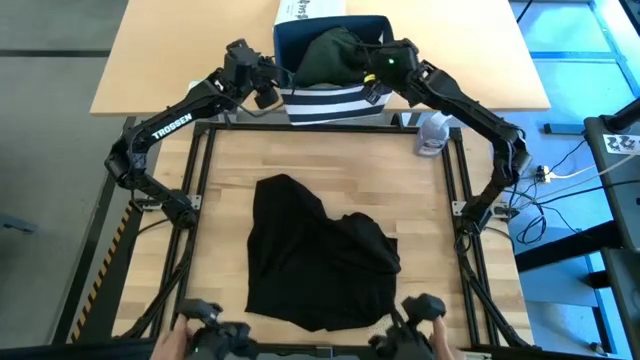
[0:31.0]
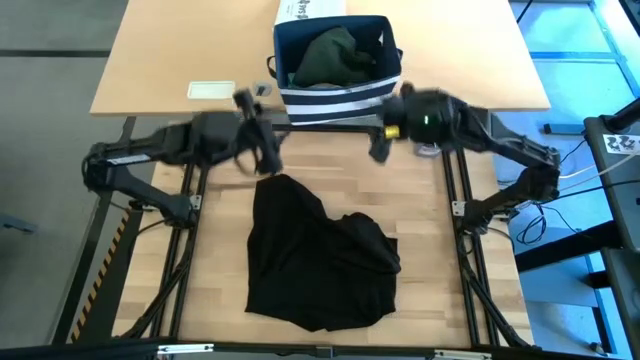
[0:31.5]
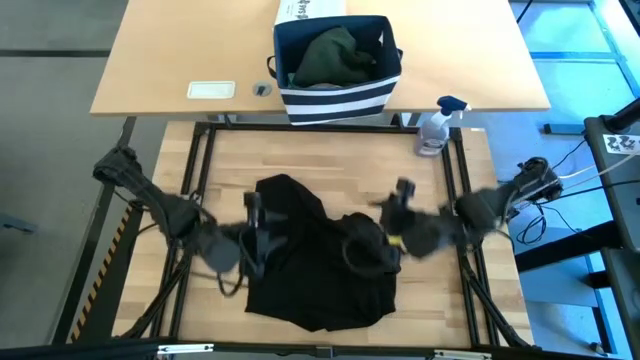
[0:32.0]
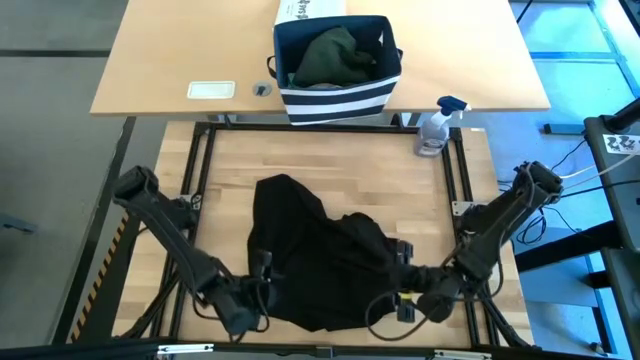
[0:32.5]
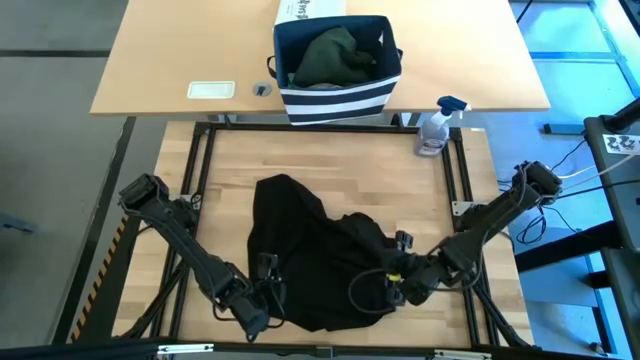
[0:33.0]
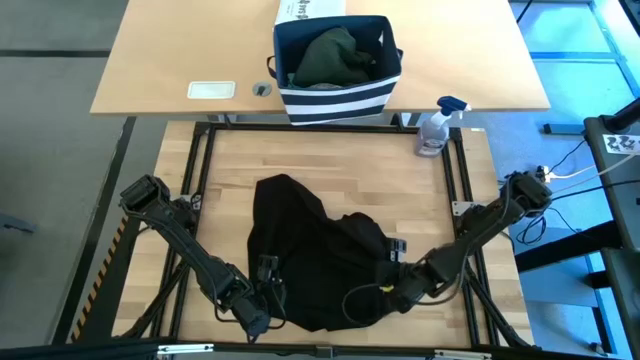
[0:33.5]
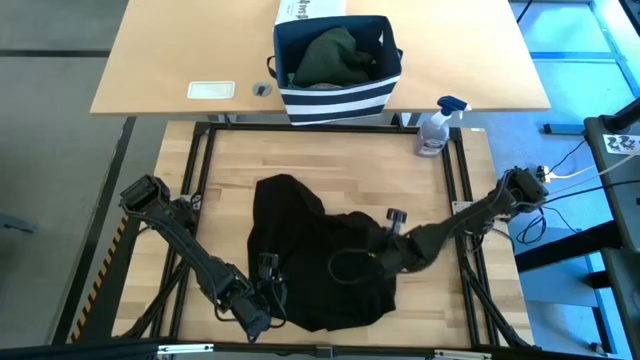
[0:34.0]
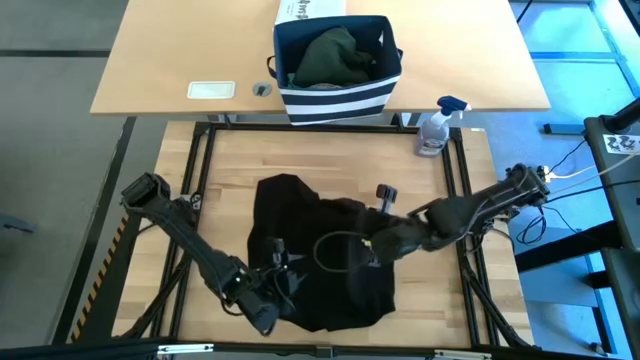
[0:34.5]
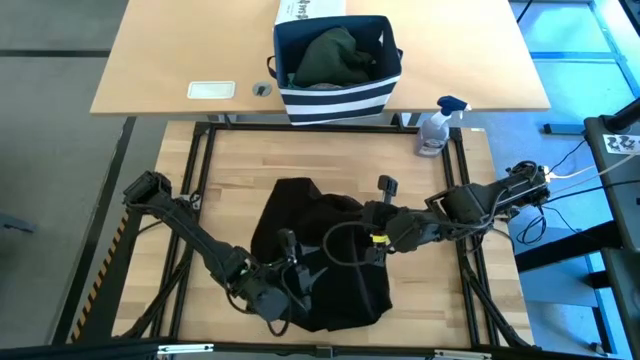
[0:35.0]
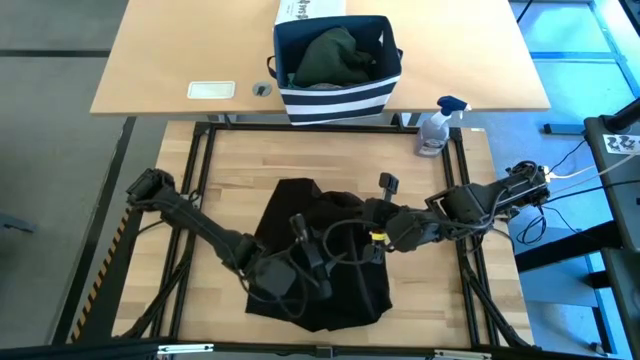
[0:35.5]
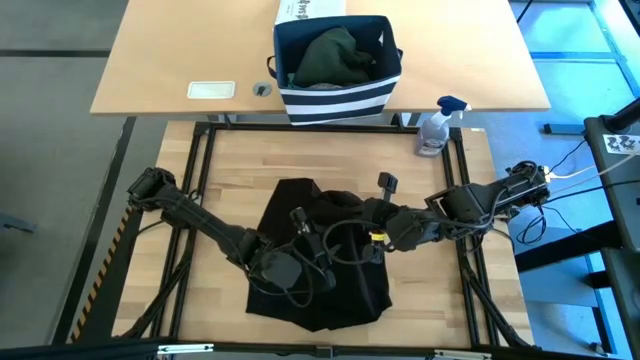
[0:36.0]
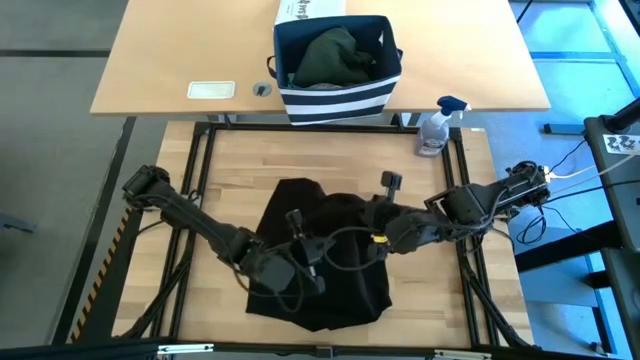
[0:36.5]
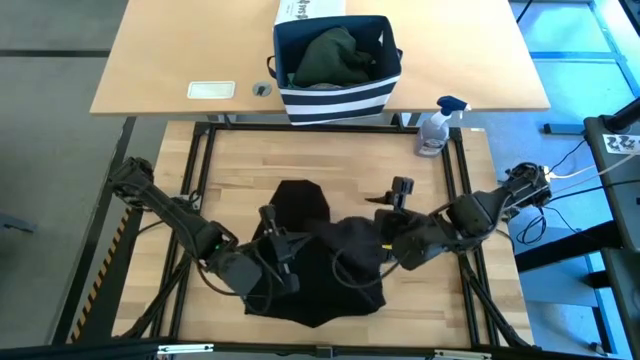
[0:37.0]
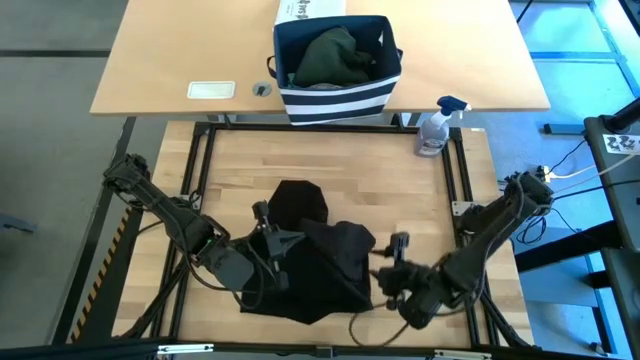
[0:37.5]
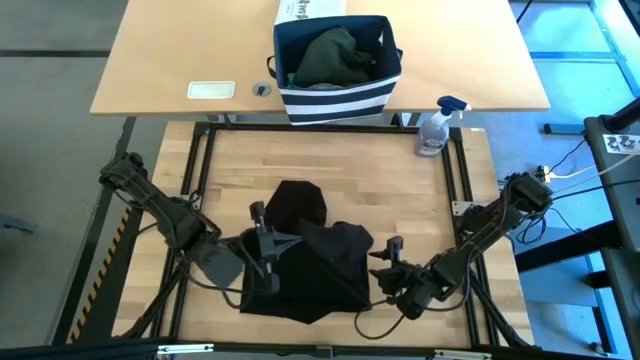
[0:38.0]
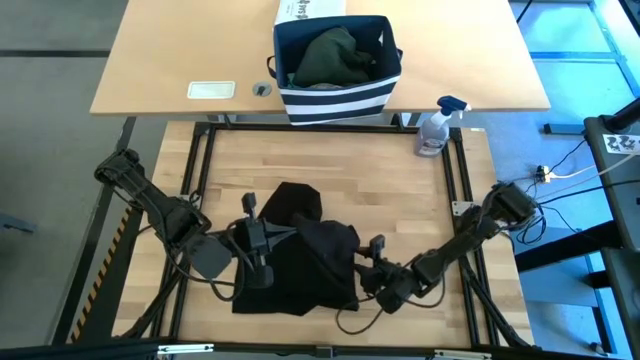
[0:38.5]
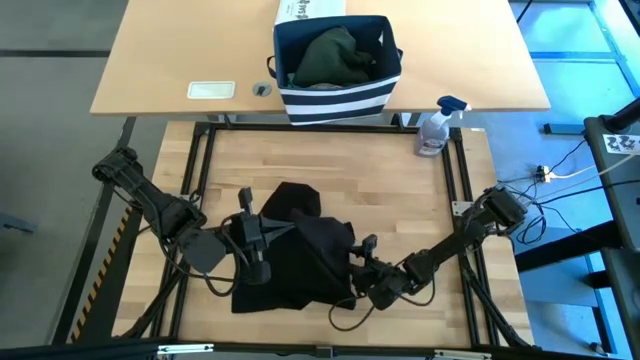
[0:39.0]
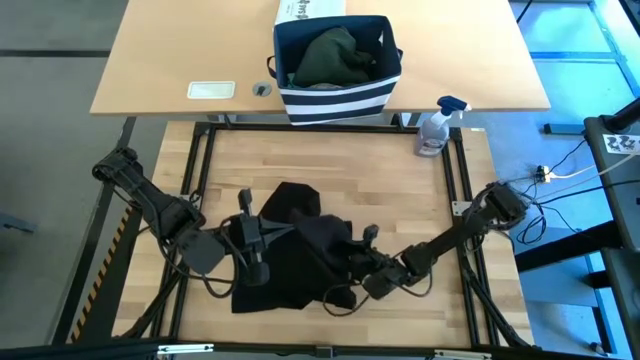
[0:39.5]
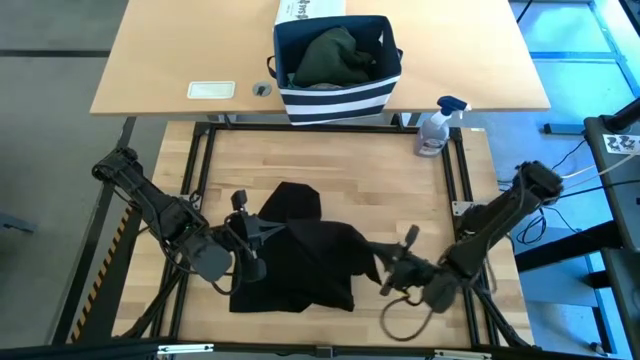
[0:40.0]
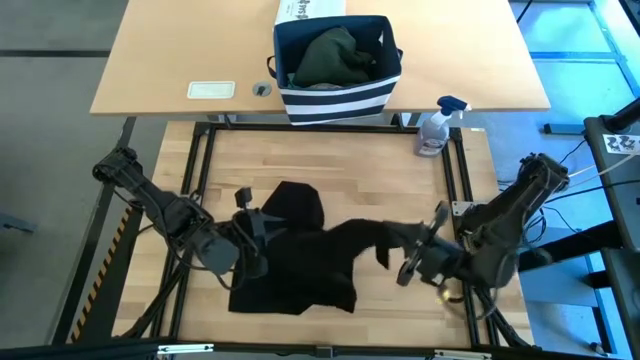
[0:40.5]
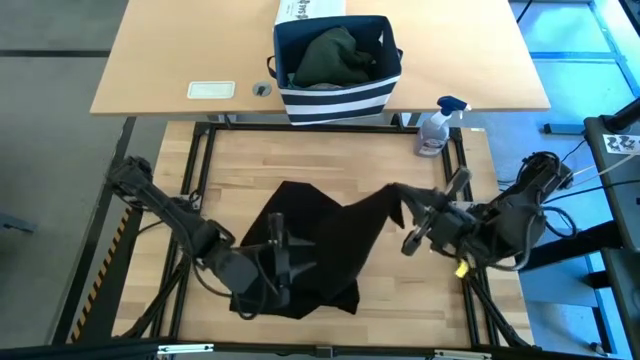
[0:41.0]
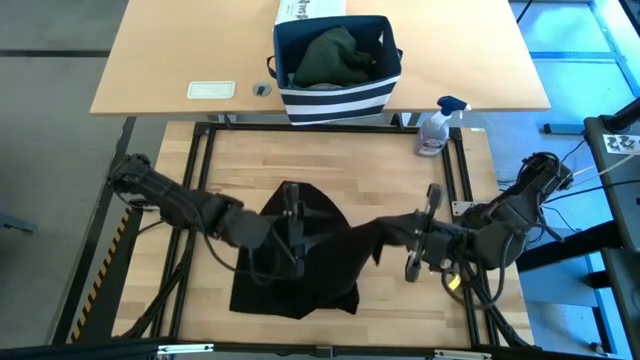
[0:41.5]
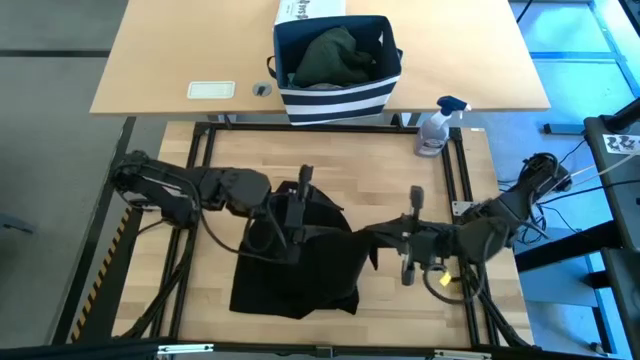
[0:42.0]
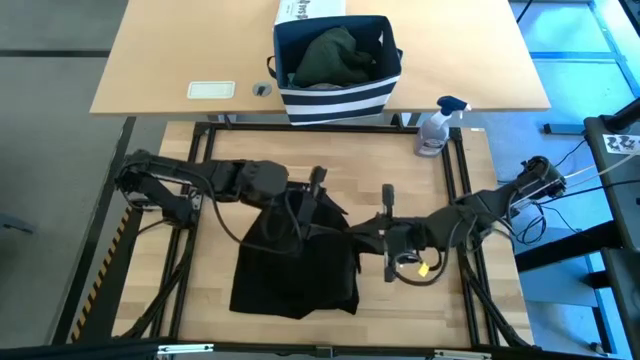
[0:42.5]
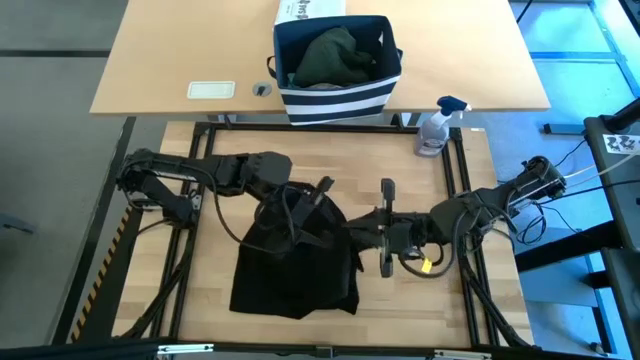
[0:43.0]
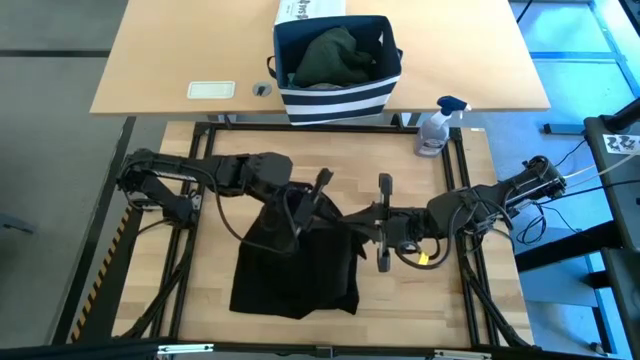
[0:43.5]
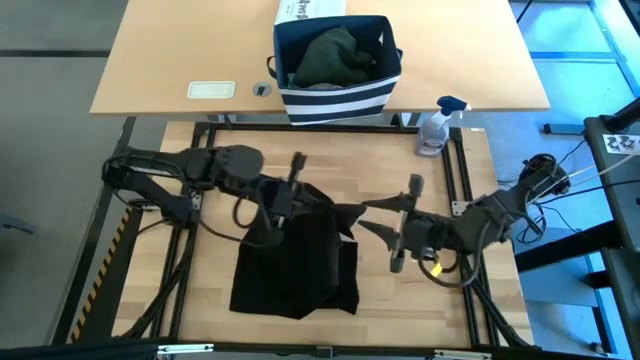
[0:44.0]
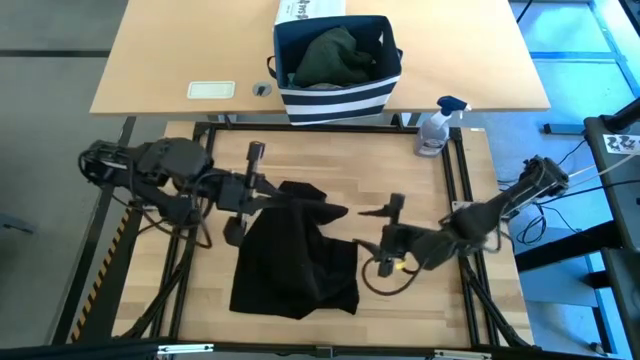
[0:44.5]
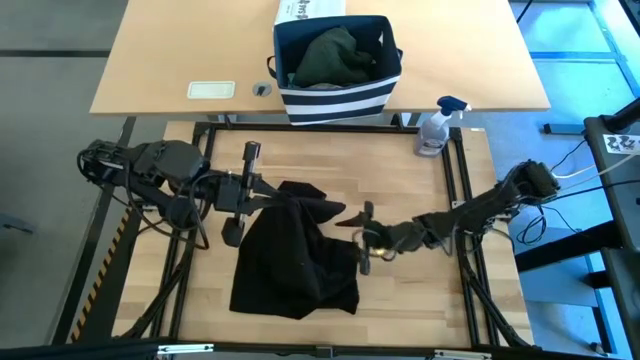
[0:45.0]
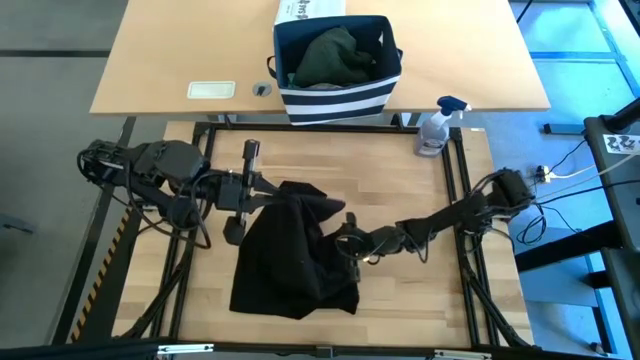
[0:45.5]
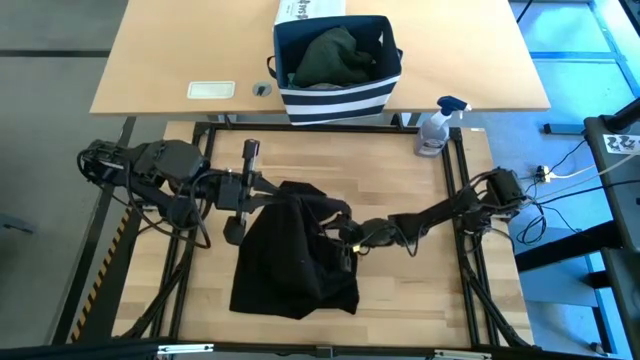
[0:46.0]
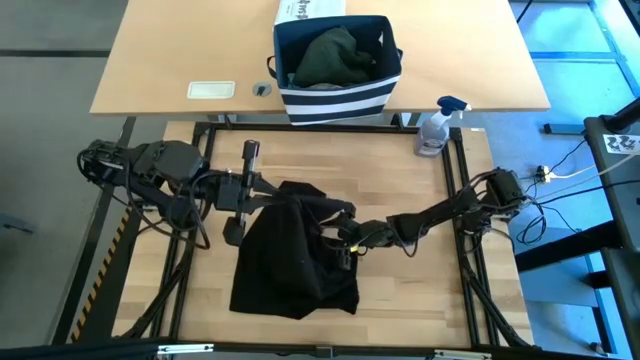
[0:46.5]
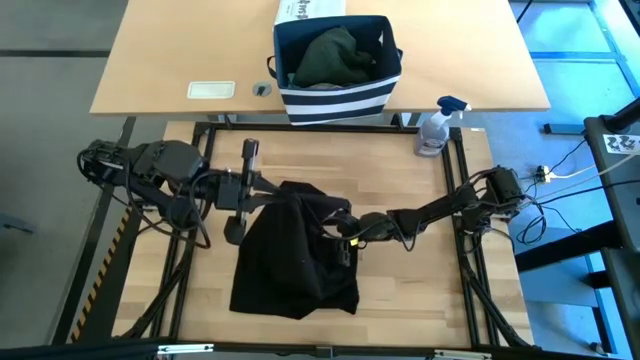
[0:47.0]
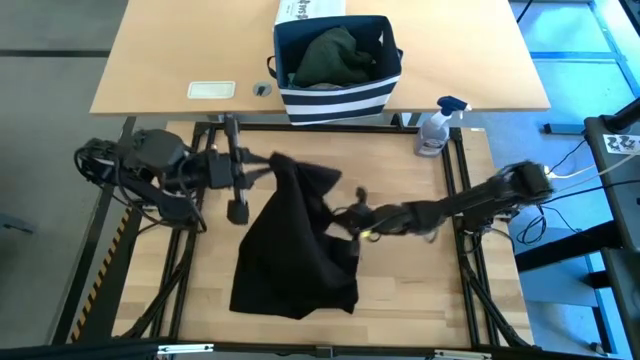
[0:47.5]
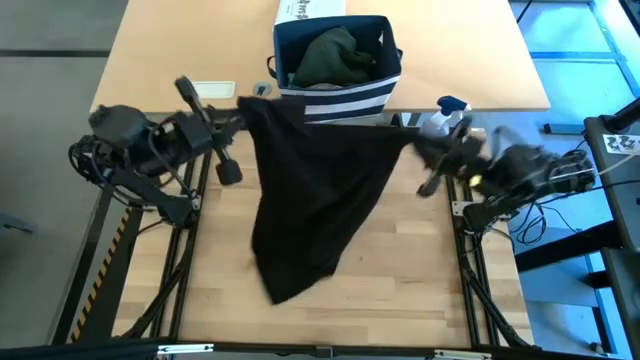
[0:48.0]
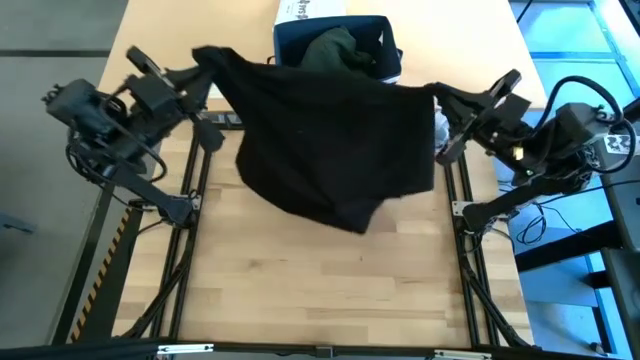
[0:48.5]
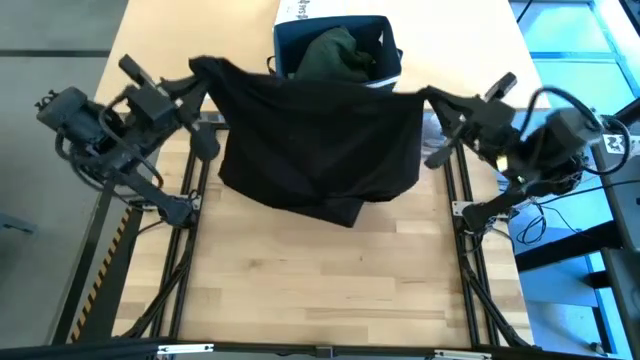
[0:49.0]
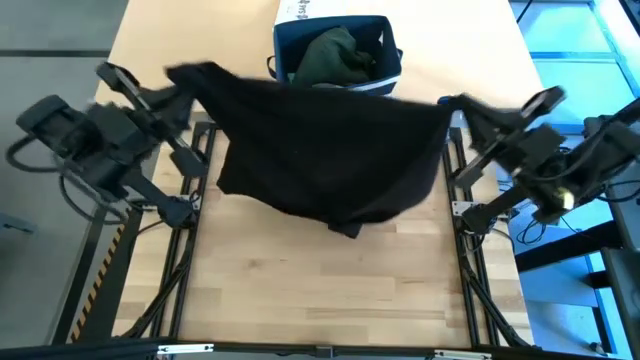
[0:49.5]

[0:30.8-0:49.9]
Task: Fold Laundry from Bin
Fold the black shirt

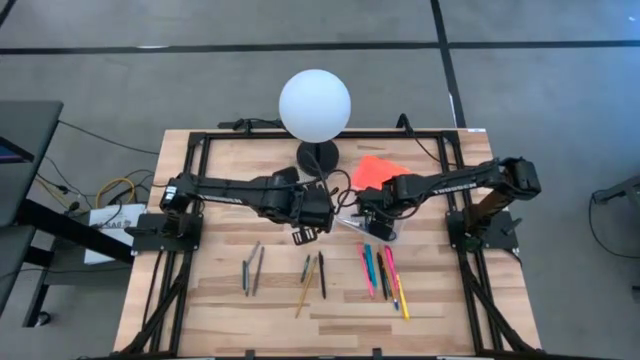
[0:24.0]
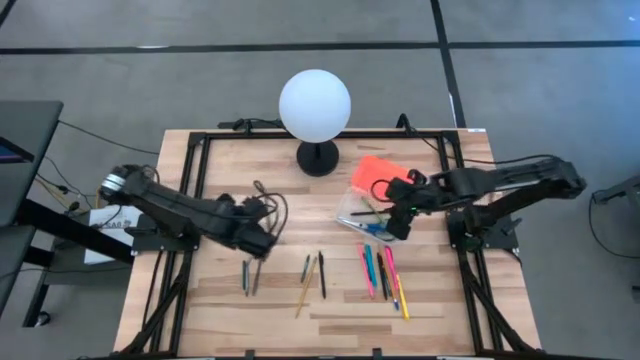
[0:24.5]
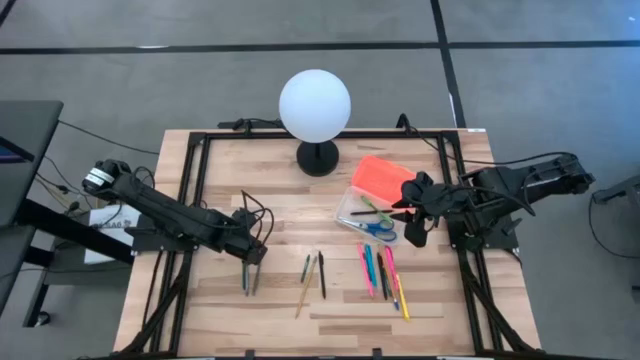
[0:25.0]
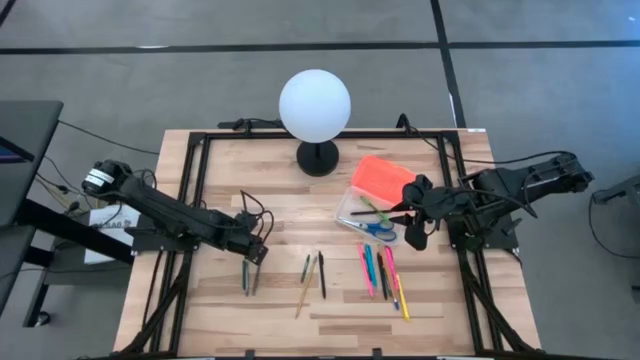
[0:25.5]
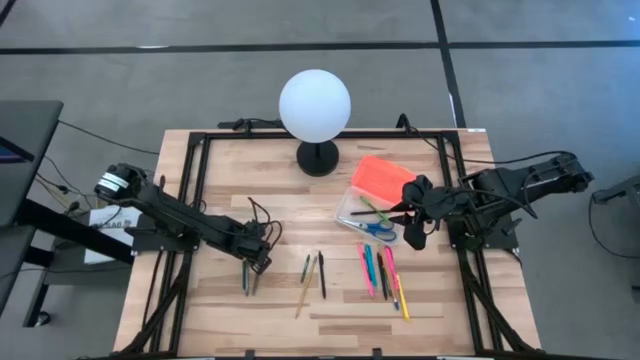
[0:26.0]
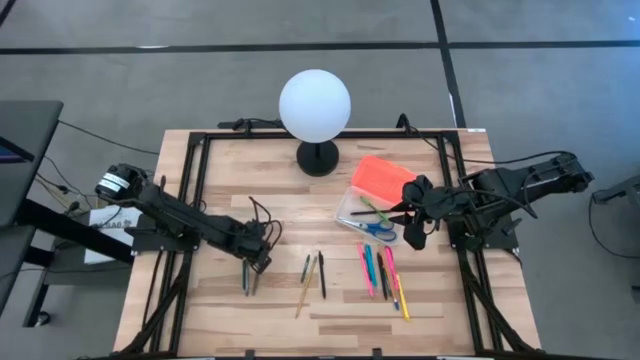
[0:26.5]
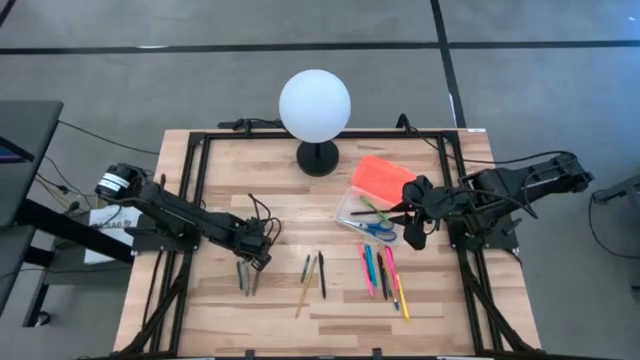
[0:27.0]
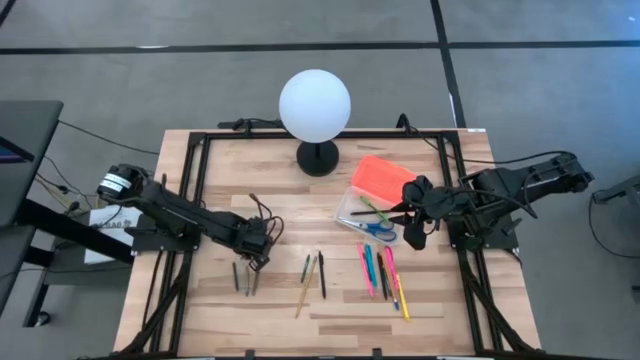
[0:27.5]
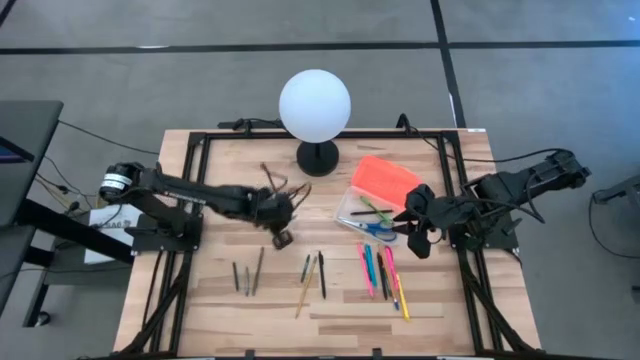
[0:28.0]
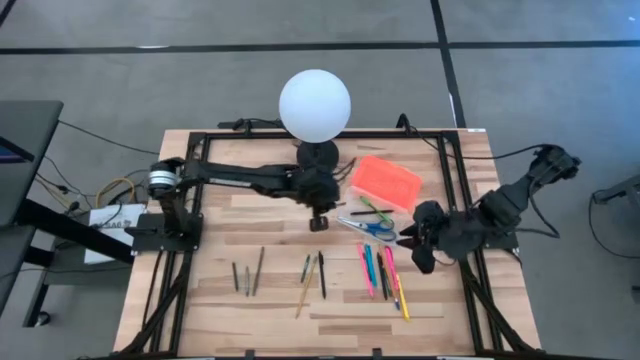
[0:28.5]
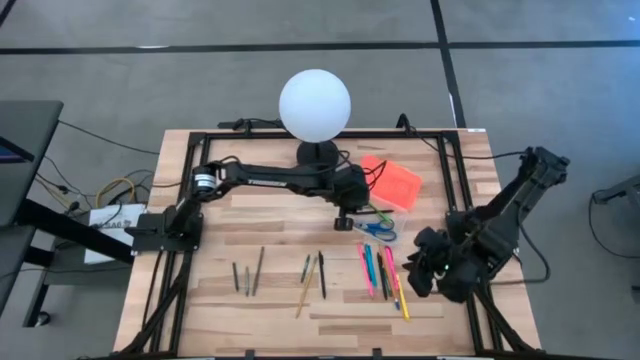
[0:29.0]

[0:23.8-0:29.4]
Task: Pick & place school supplies into a supply box
Put the gray crayon into the orange supply box
